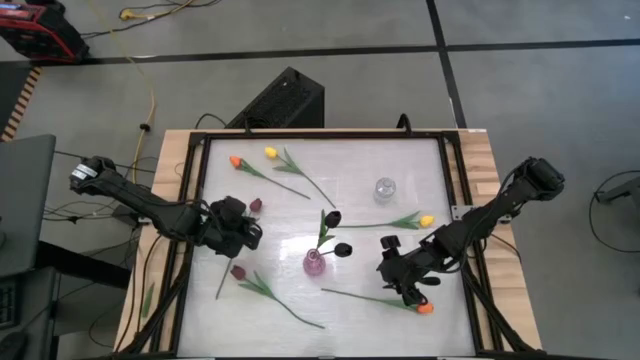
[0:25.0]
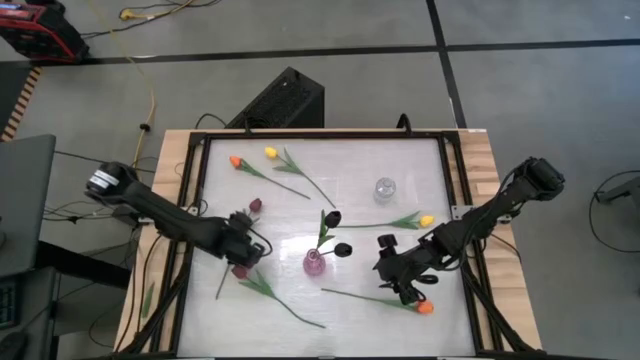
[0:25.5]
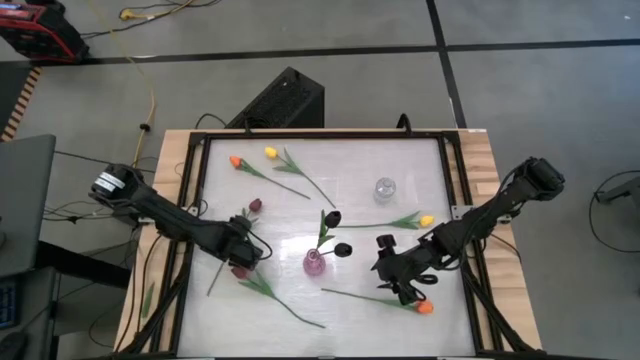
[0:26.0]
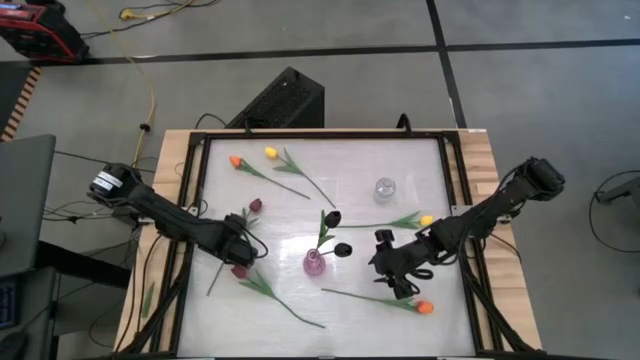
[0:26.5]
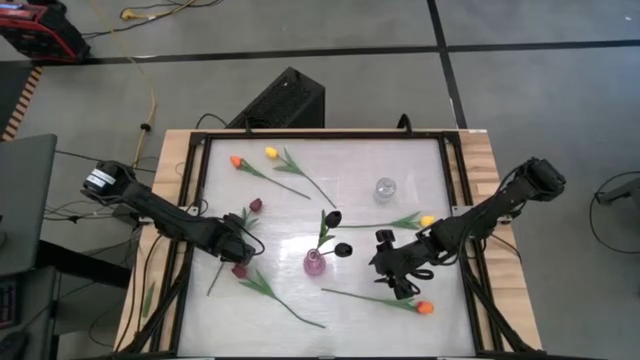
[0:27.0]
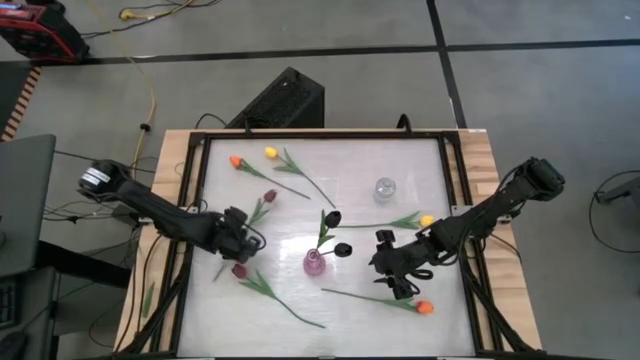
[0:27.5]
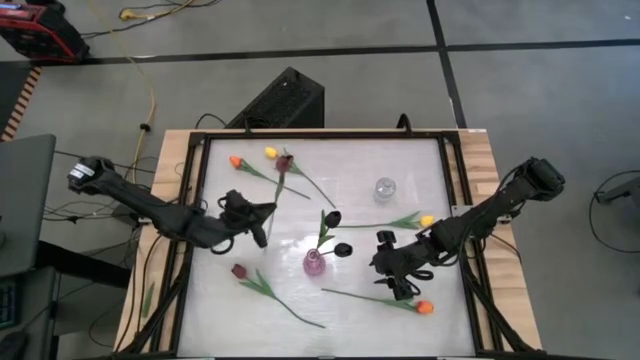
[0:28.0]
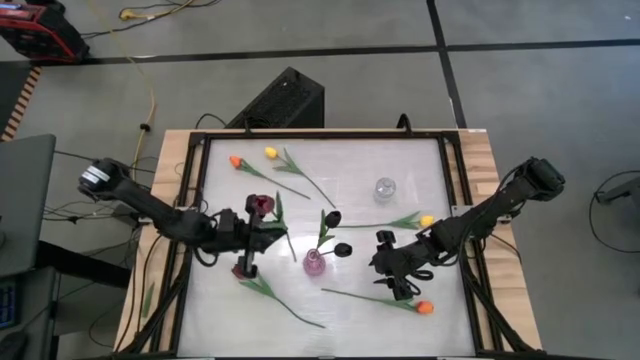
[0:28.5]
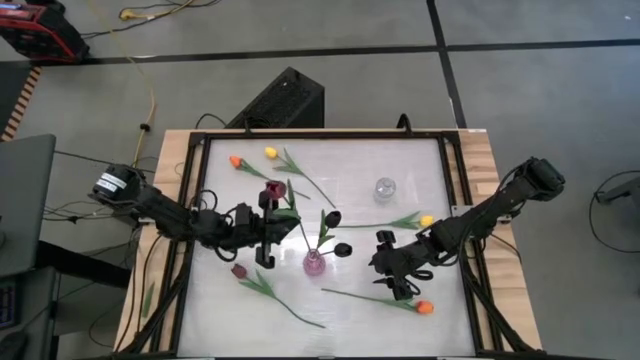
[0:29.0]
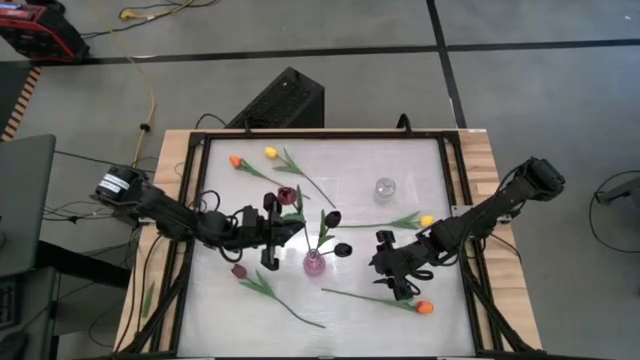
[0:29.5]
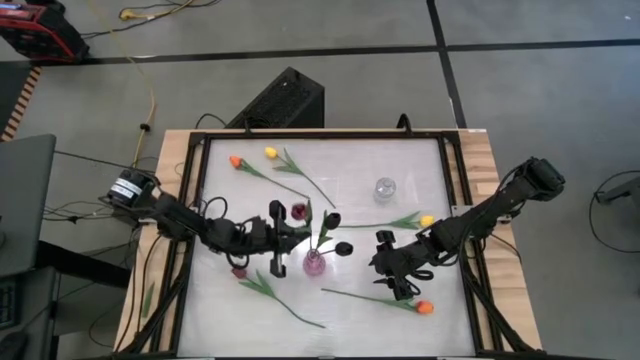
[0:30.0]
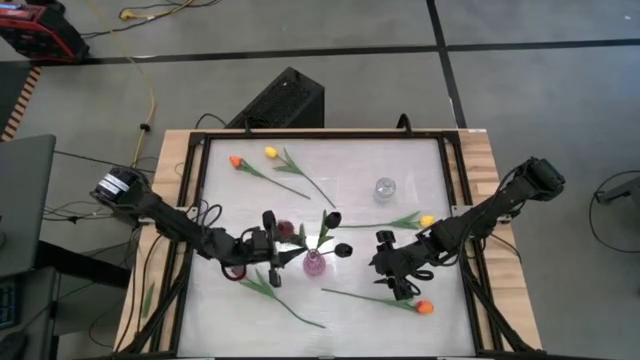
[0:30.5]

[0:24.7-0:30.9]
Task: Sort flowers into vase by color
Put the top red flower into the purple vase

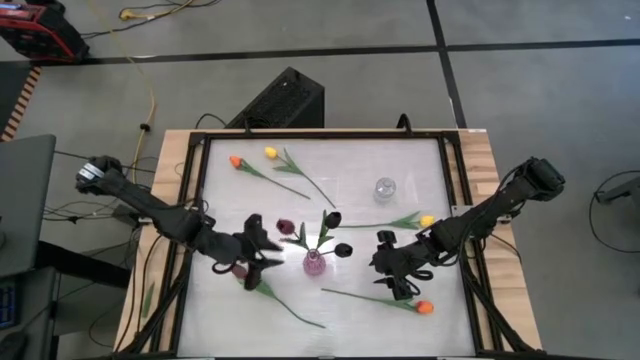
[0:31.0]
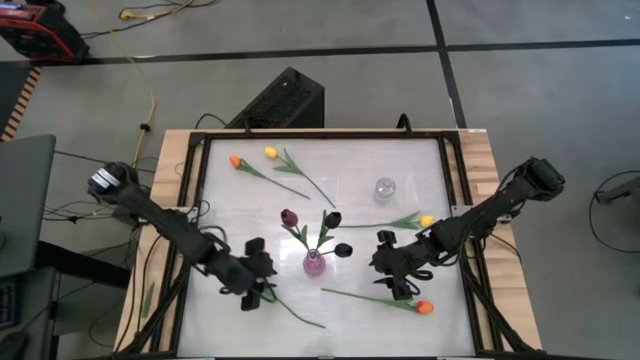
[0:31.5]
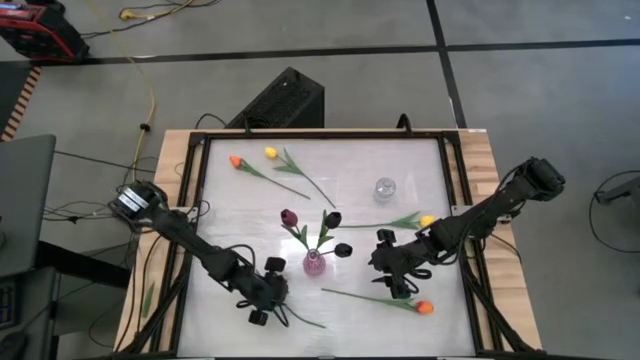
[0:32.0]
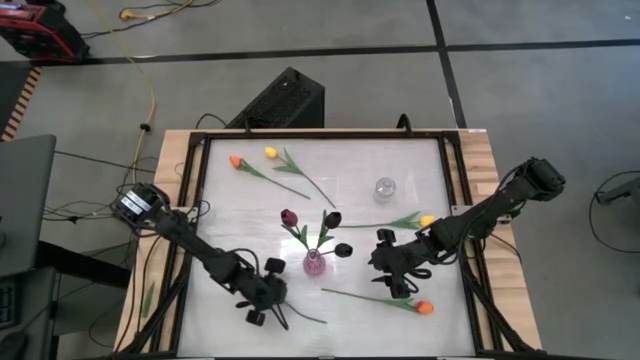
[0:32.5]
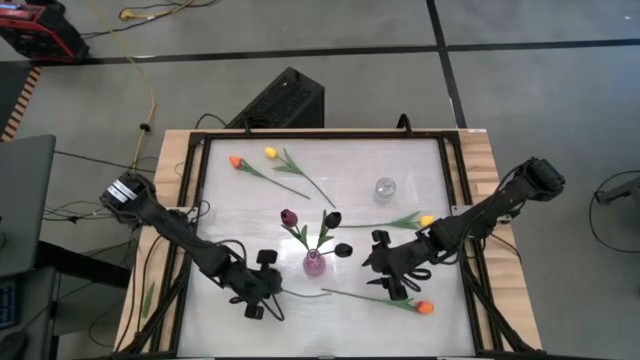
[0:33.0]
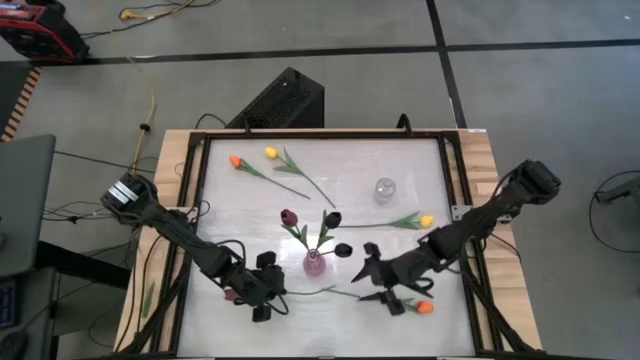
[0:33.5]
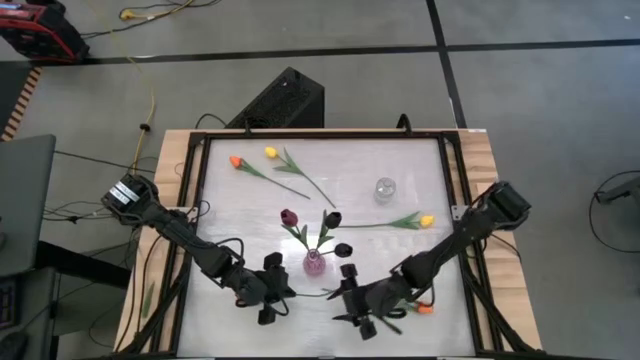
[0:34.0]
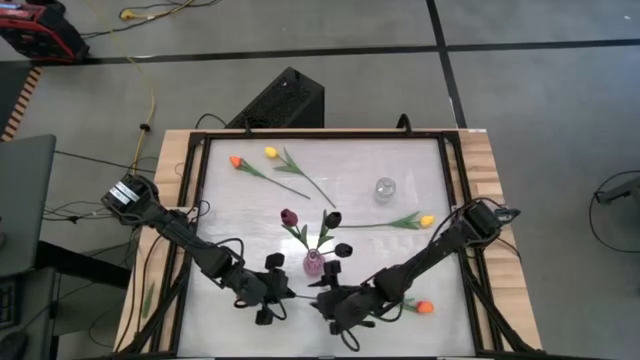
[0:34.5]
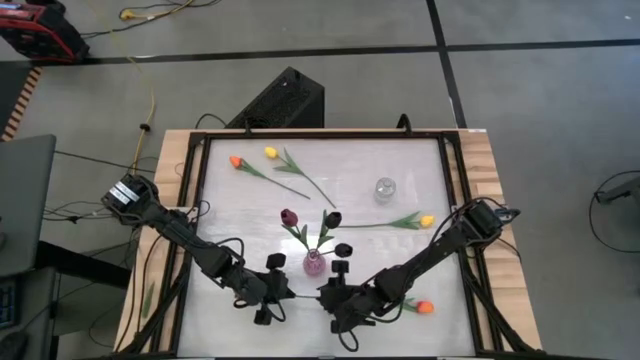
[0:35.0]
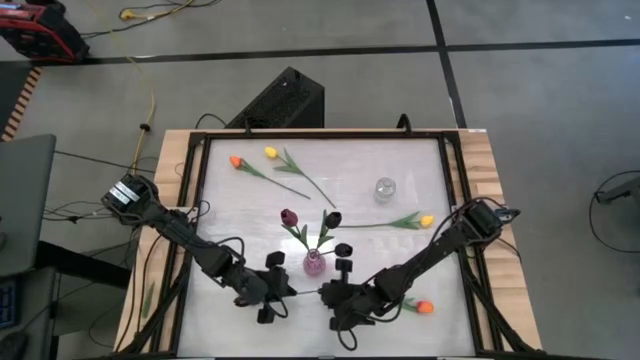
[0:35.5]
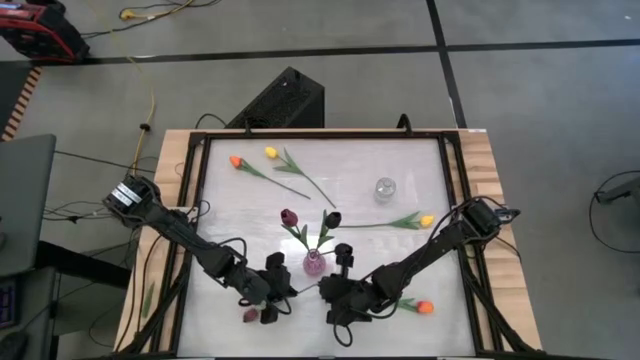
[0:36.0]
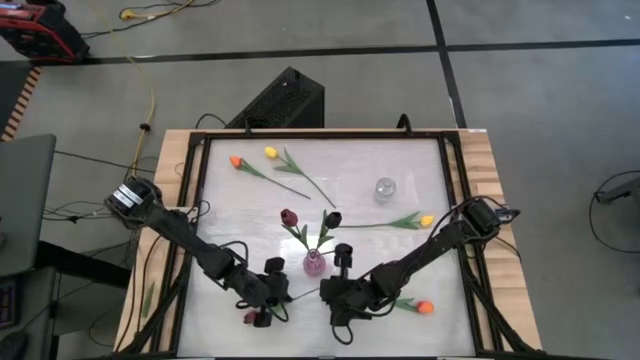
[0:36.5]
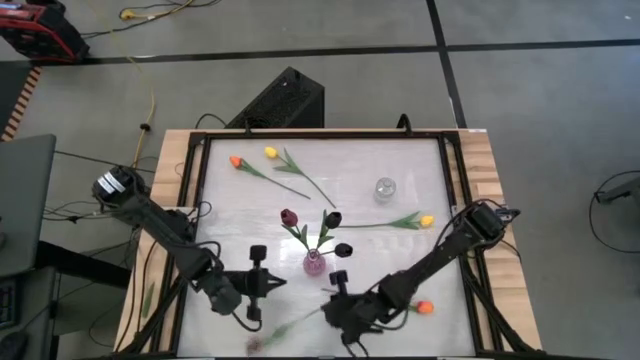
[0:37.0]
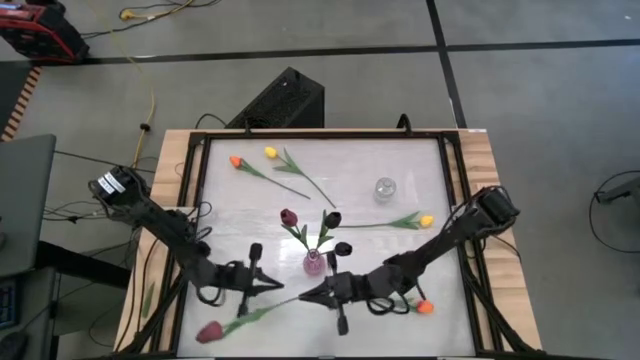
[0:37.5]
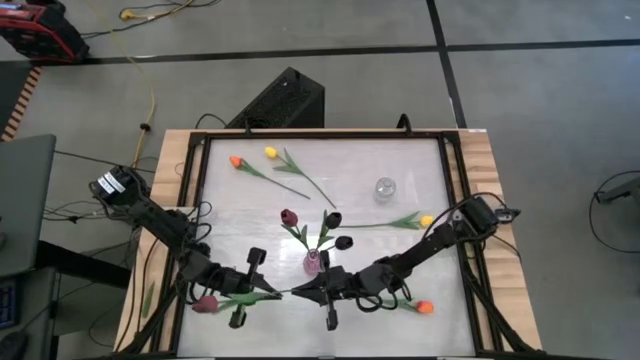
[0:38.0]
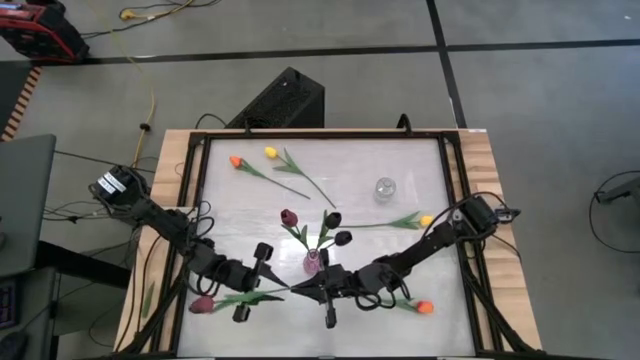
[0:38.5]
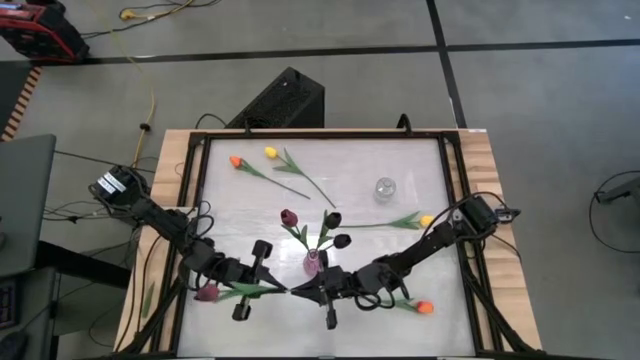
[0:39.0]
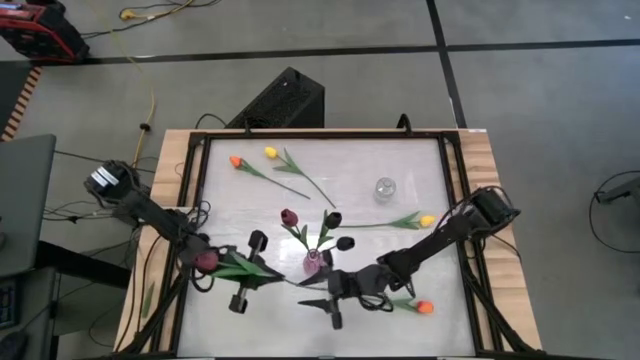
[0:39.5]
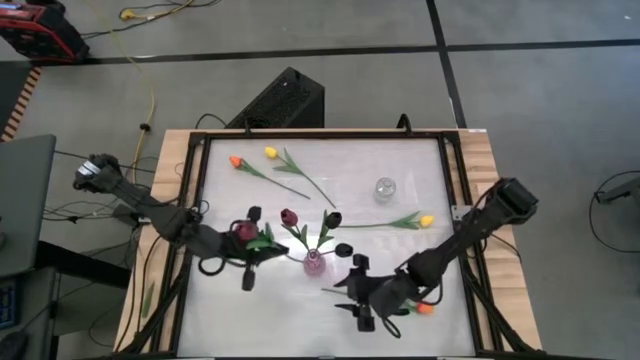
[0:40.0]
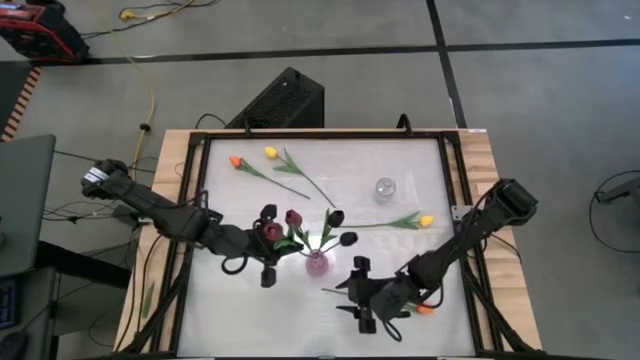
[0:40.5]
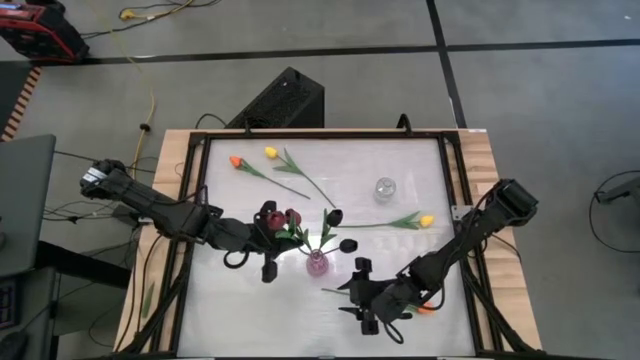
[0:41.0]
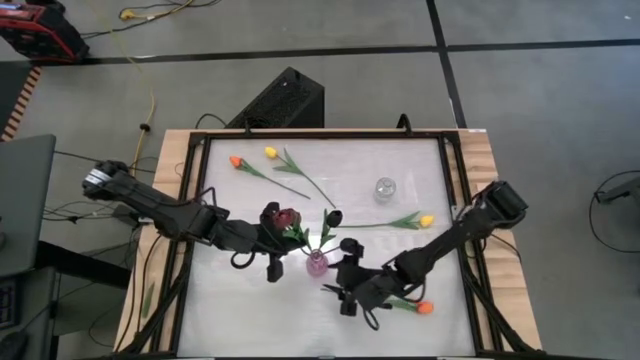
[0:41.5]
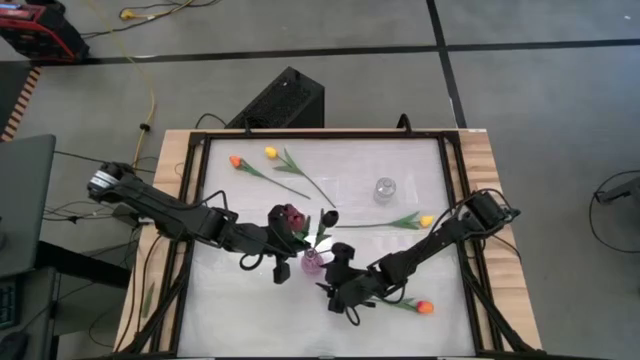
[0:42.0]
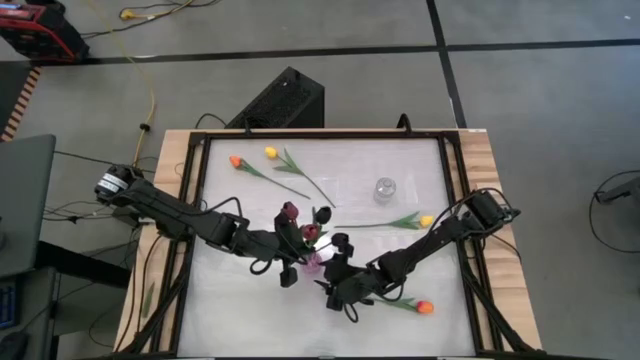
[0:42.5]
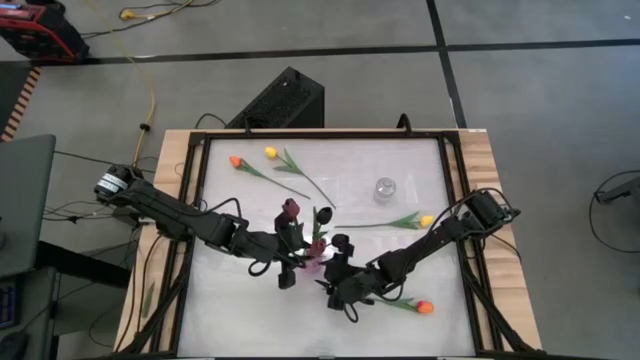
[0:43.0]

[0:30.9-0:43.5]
Put the red flower into the purple vase

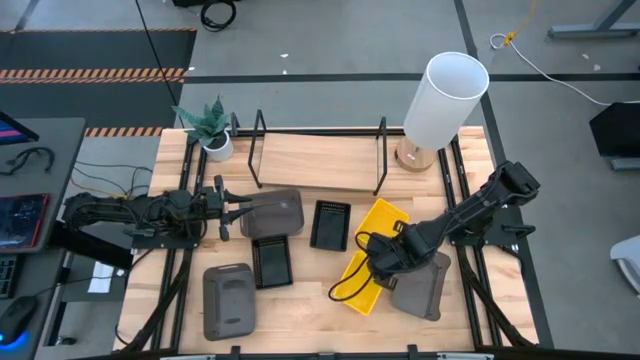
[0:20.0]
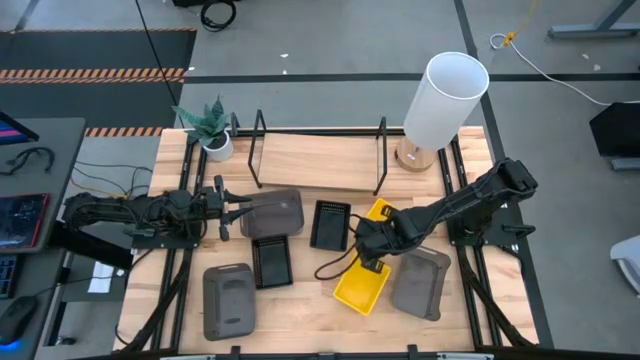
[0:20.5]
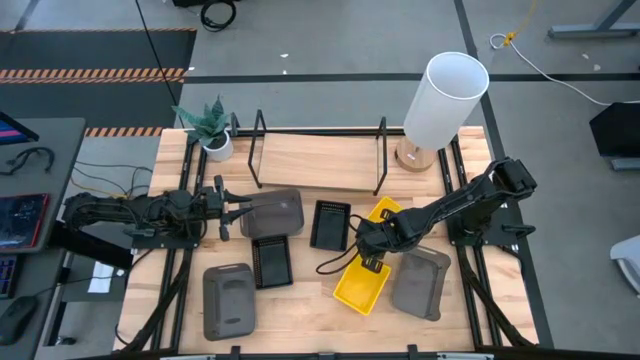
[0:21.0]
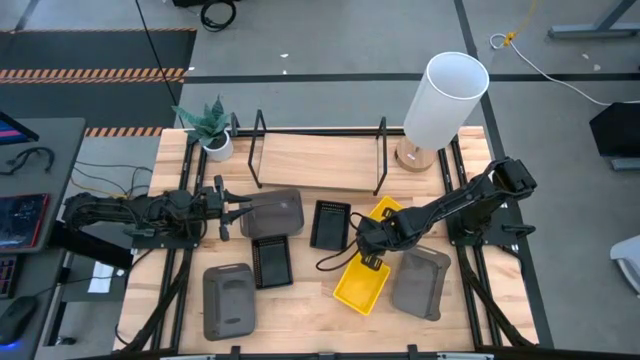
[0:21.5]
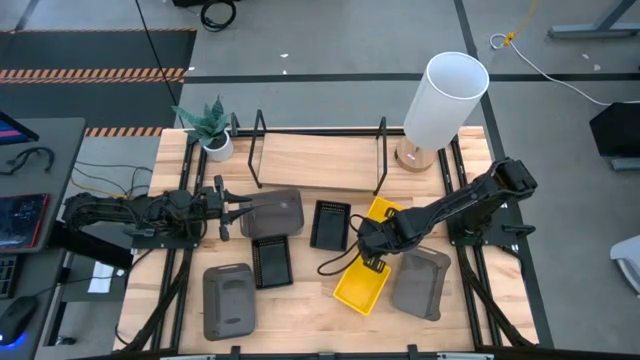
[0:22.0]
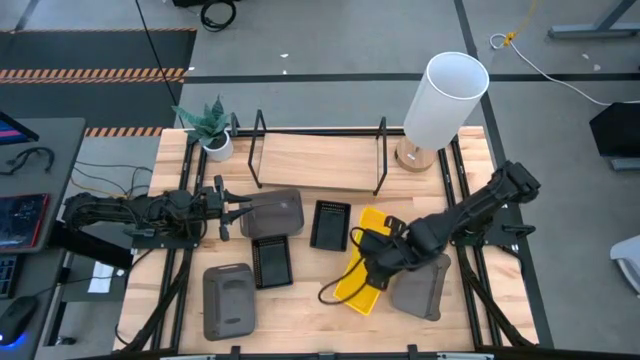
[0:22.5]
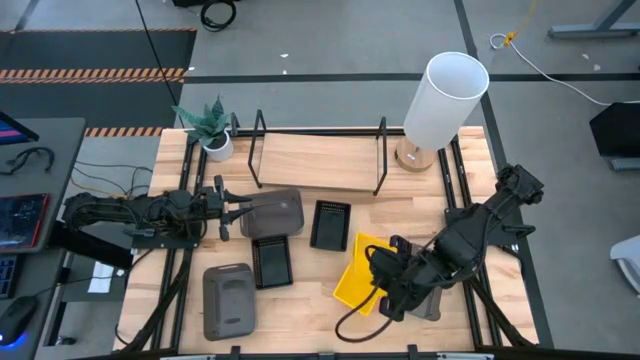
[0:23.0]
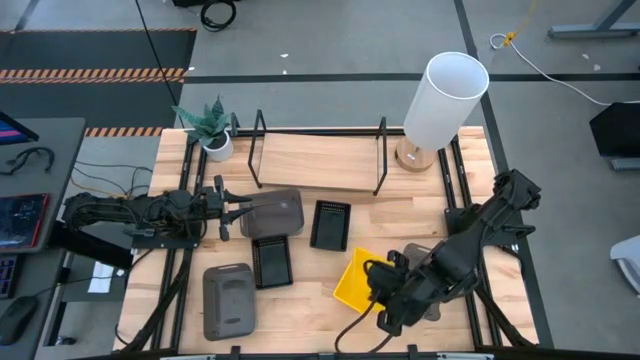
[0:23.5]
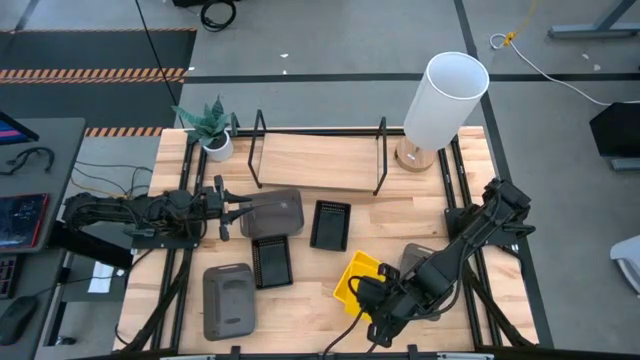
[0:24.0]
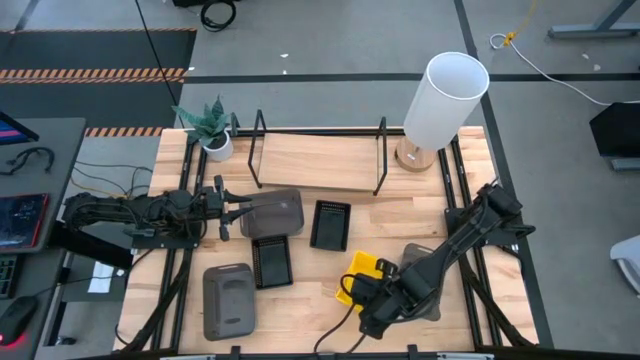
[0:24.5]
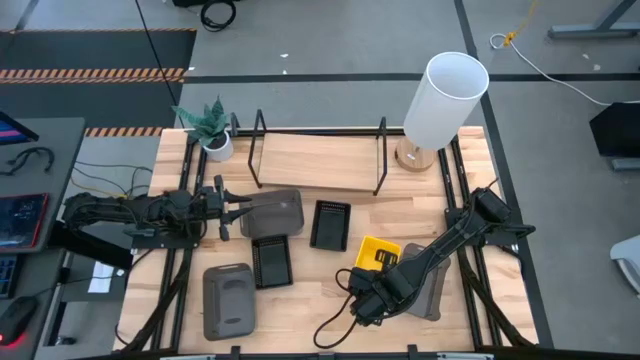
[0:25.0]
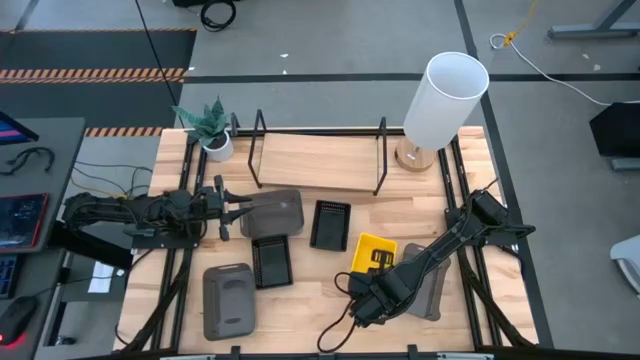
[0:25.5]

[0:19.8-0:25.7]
Task: Stack baskets on shelf by color
Stack the top yellow bin on top of the bottom yellow bin
